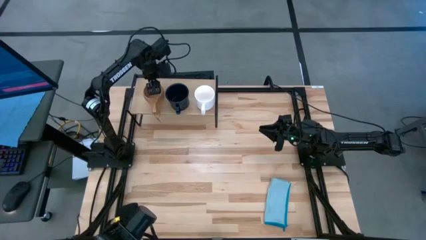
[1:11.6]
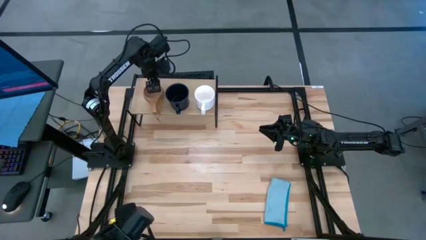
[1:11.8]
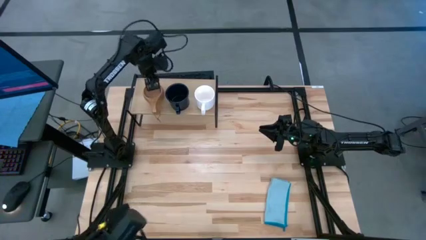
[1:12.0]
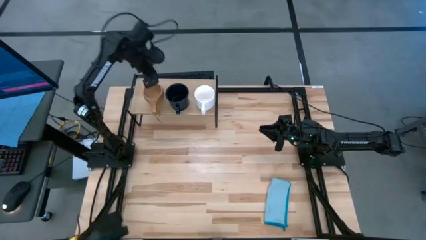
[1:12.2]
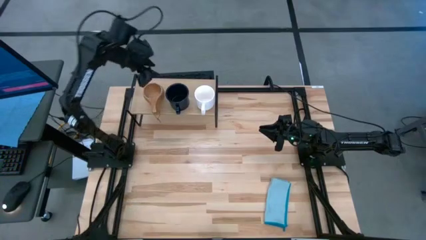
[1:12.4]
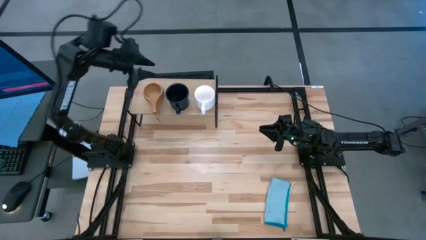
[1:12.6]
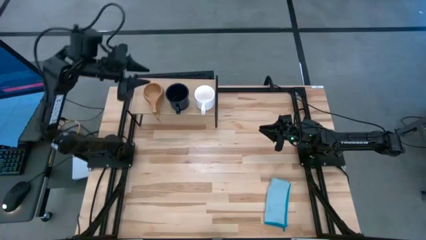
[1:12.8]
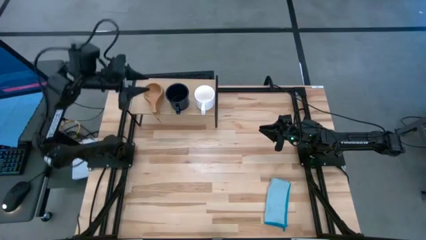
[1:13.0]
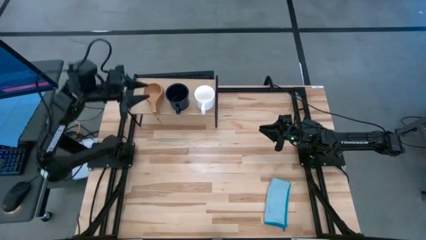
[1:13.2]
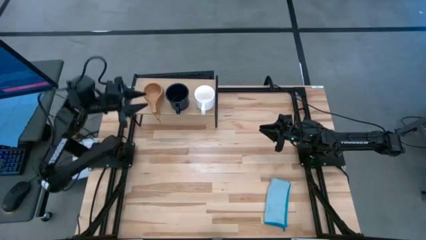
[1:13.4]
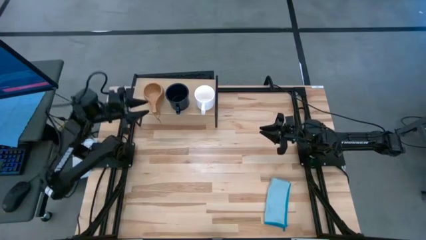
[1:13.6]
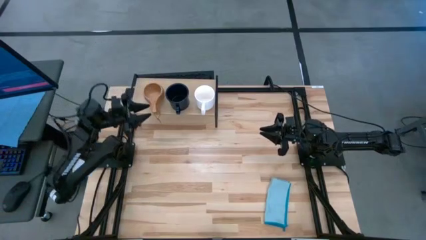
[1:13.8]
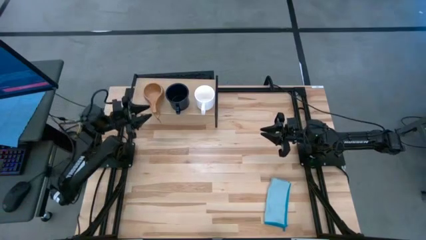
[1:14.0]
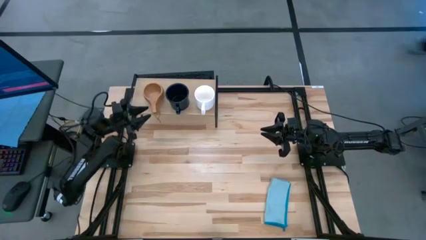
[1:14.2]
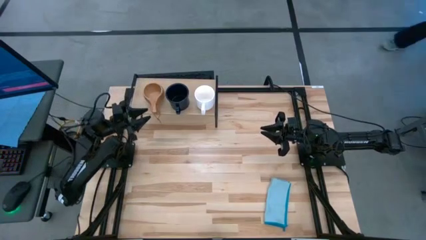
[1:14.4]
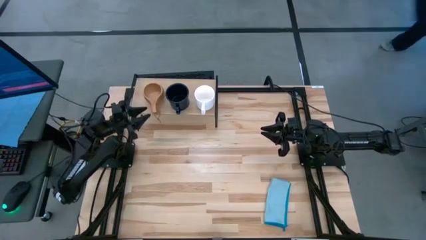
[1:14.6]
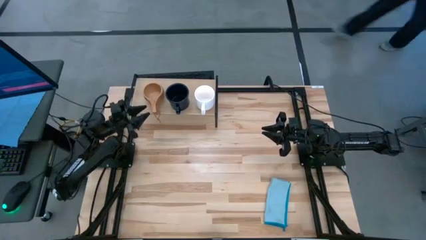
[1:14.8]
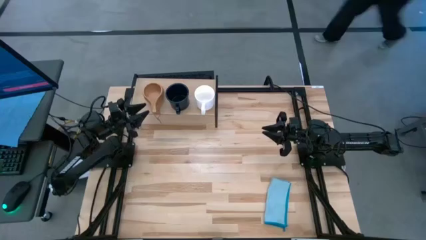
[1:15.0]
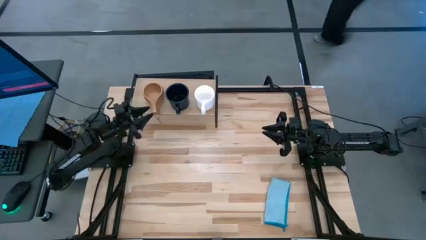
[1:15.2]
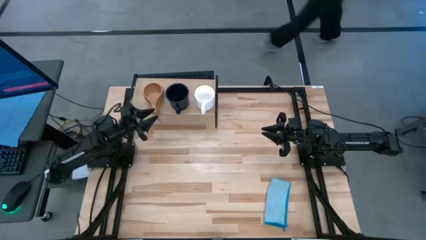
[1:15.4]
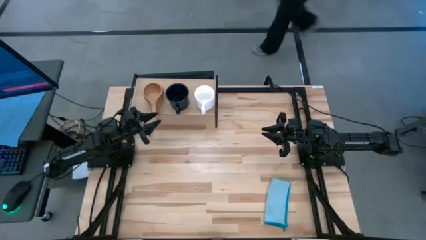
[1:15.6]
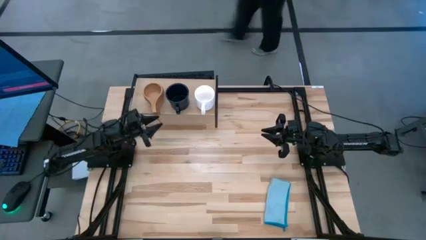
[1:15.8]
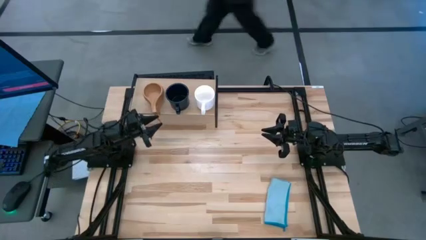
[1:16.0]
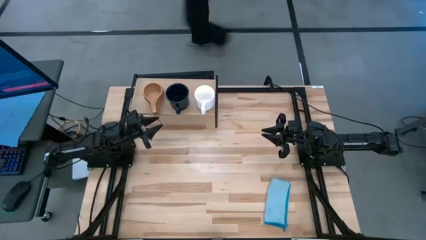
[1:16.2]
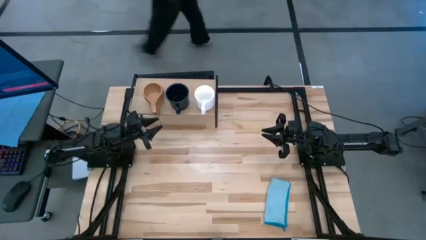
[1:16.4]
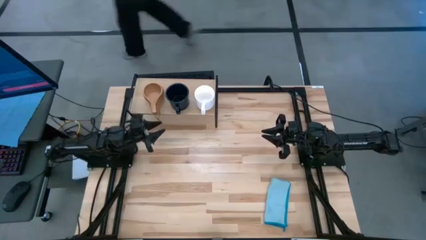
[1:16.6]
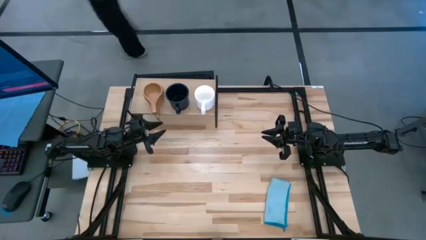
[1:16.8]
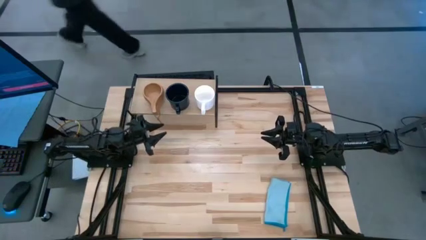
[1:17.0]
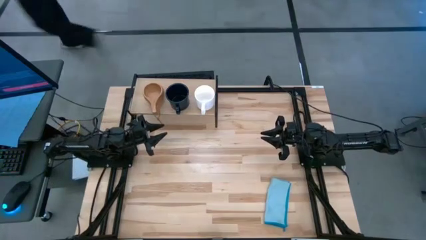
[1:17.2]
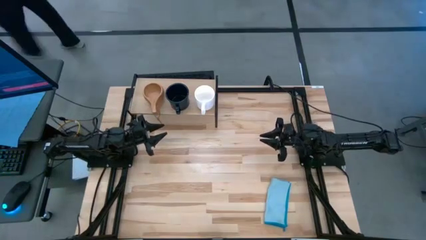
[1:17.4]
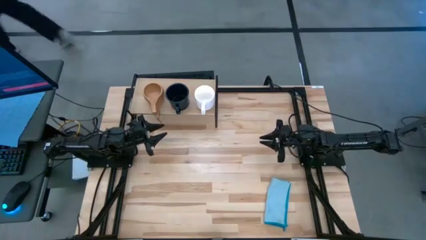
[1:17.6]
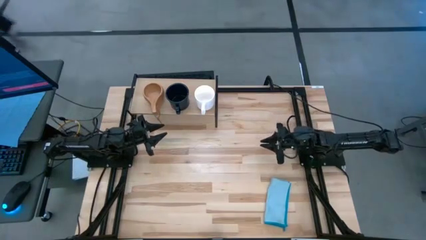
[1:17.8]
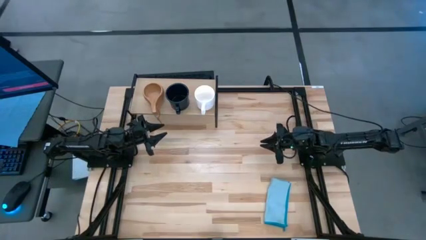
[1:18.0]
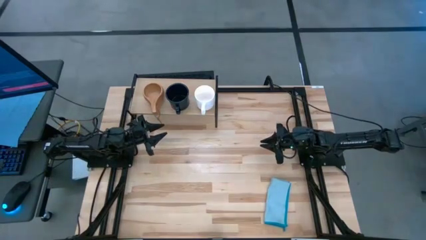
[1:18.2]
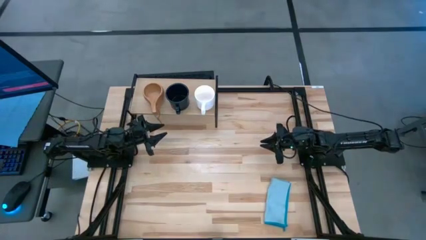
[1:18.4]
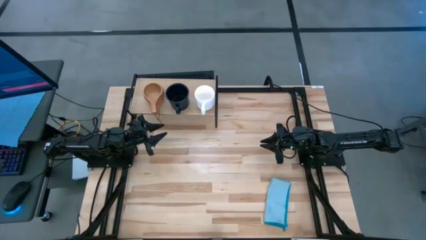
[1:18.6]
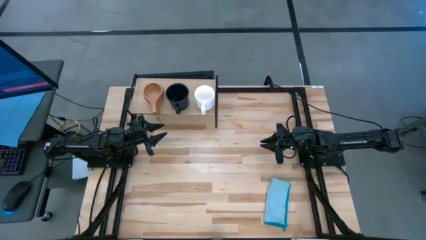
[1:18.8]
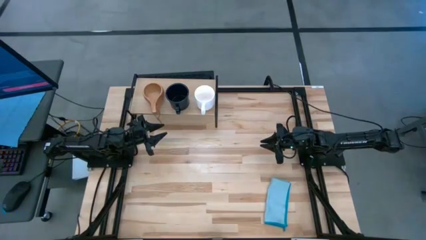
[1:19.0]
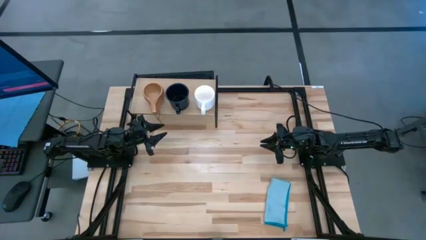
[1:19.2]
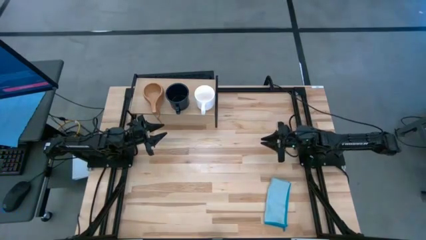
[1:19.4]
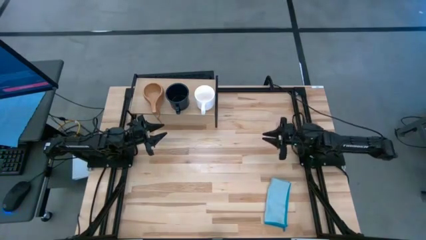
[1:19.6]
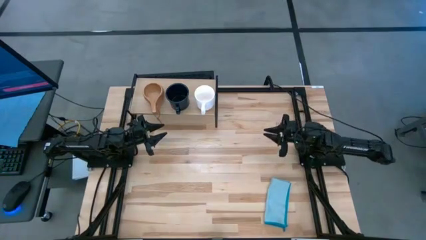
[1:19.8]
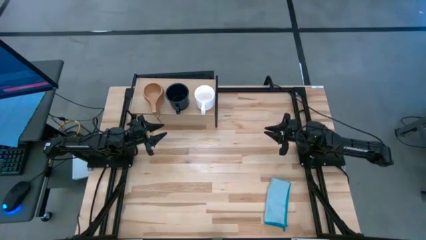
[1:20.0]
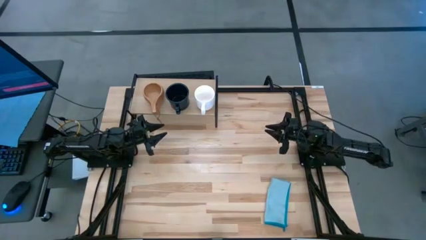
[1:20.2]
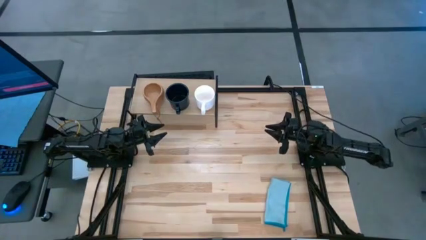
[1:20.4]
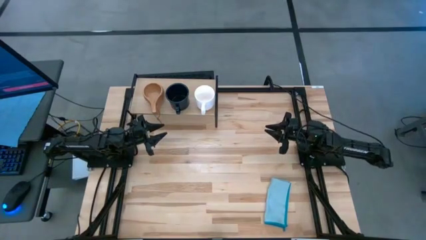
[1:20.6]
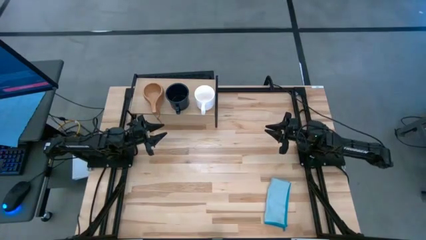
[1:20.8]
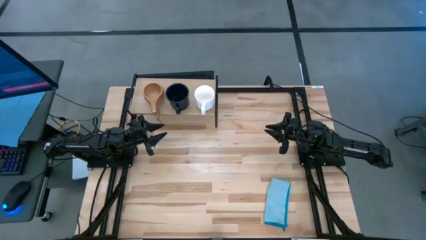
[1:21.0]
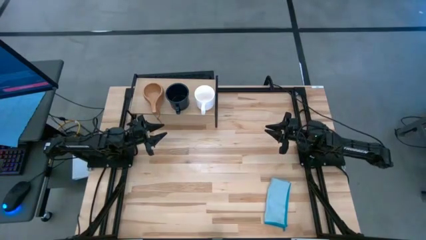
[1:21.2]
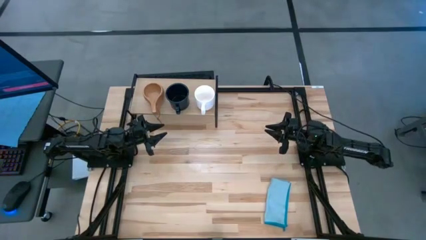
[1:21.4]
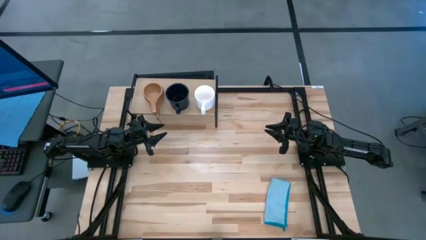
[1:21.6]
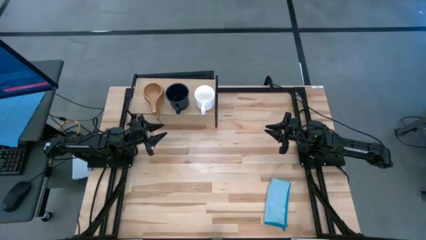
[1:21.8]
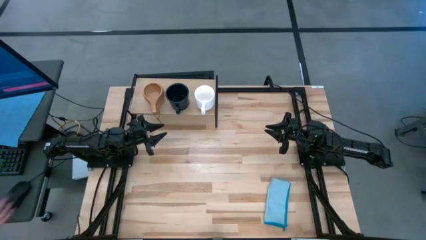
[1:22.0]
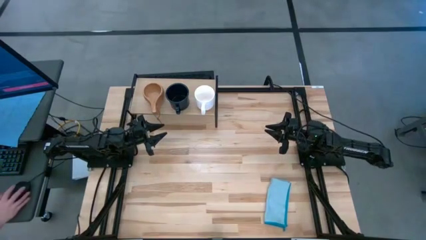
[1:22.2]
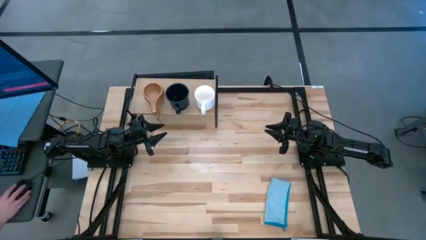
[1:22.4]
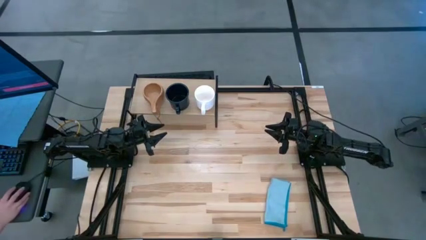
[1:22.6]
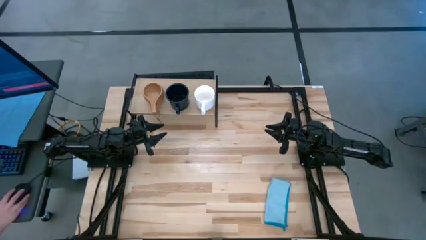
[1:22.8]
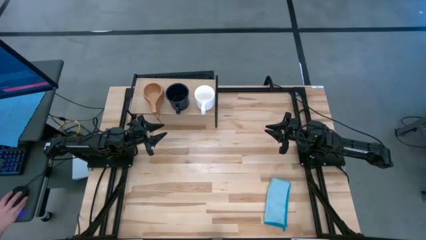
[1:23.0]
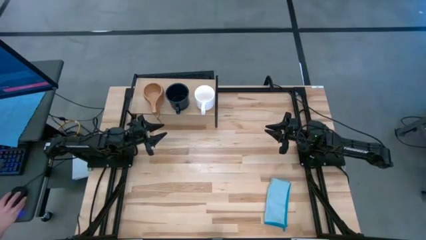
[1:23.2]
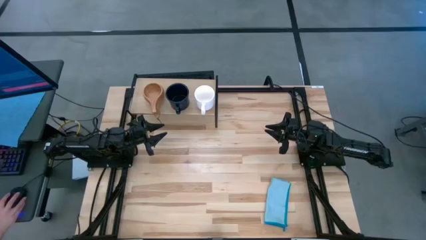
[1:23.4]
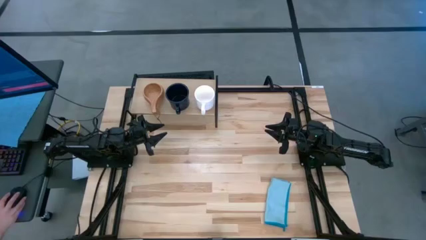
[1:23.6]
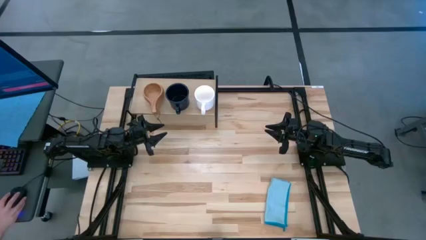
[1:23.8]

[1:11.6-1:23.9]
Task: Stack small to large cups/mugs on shelf
Return to Home Position

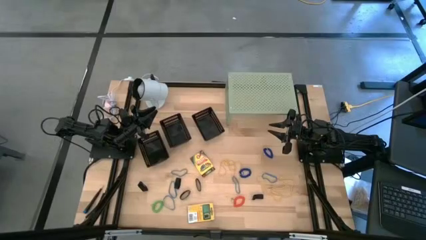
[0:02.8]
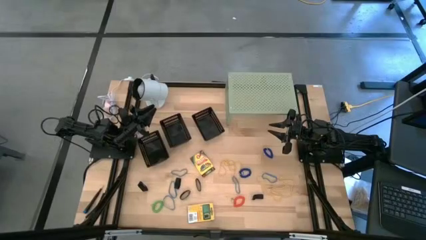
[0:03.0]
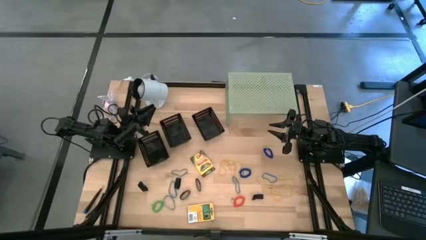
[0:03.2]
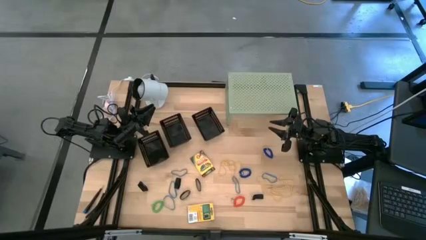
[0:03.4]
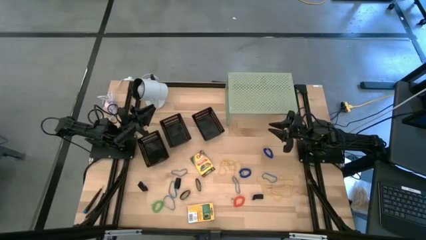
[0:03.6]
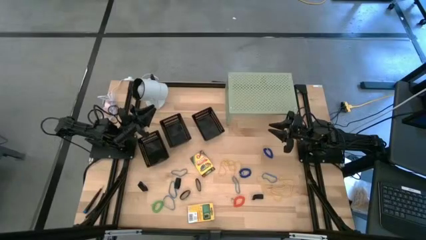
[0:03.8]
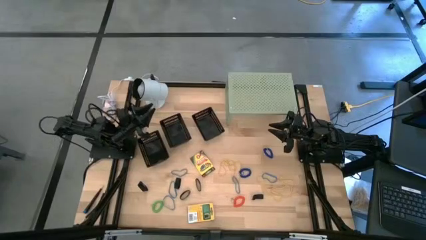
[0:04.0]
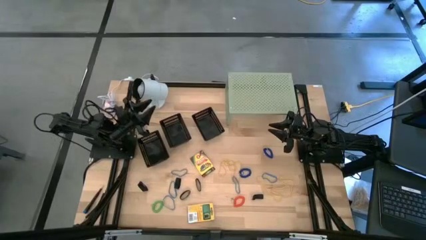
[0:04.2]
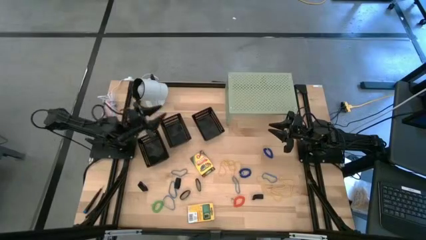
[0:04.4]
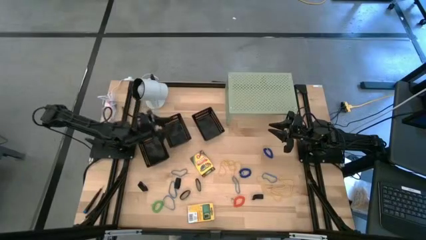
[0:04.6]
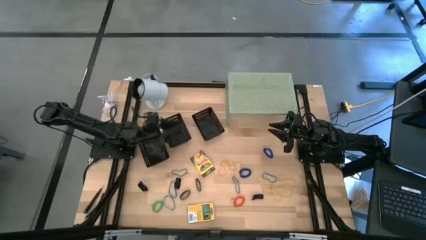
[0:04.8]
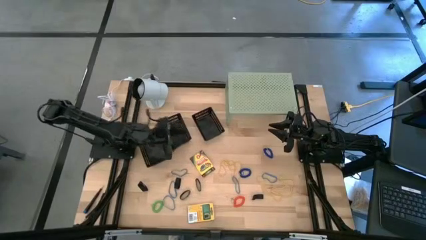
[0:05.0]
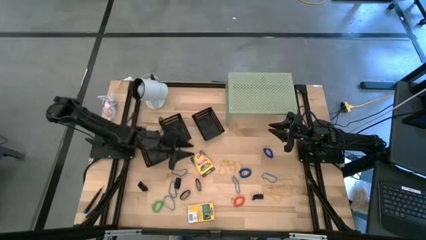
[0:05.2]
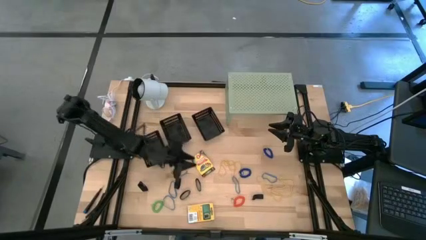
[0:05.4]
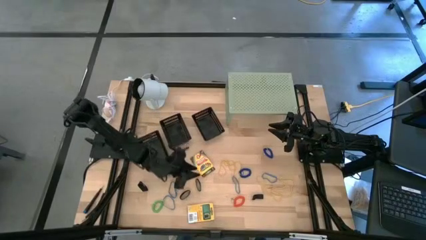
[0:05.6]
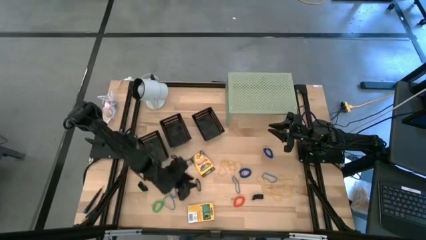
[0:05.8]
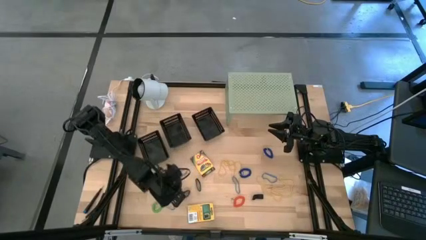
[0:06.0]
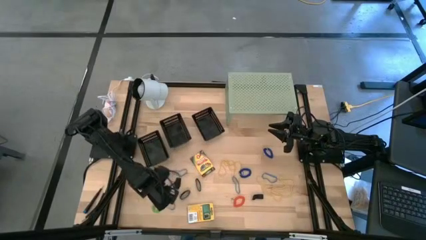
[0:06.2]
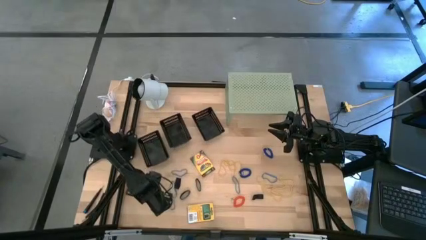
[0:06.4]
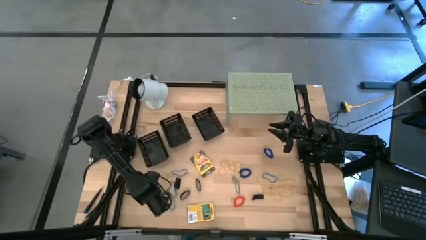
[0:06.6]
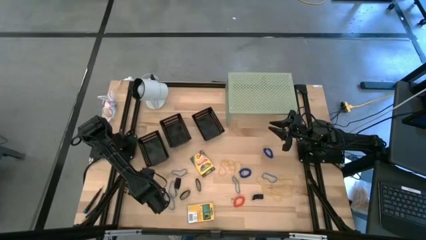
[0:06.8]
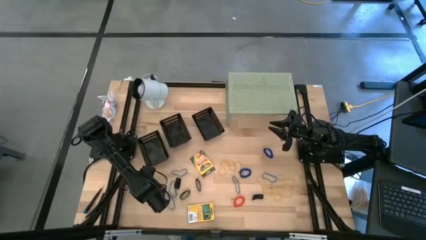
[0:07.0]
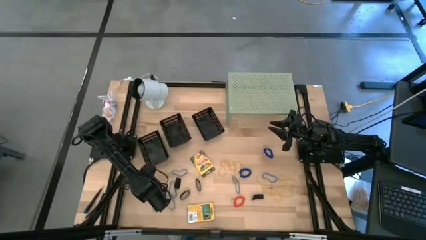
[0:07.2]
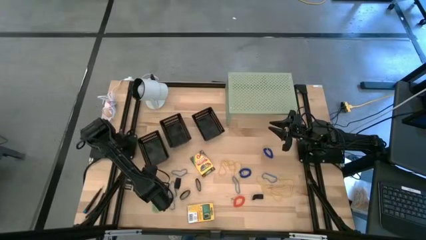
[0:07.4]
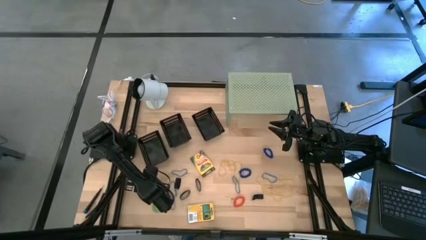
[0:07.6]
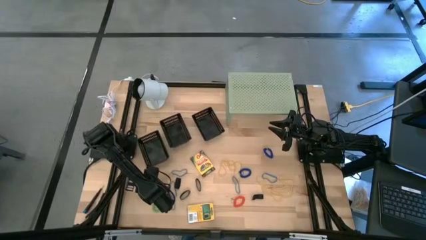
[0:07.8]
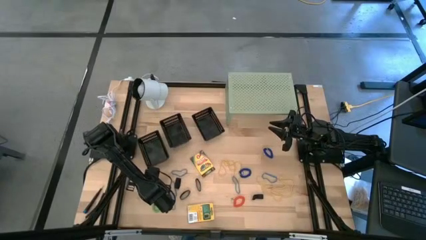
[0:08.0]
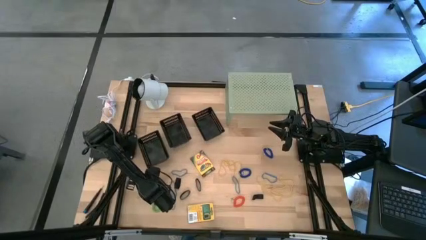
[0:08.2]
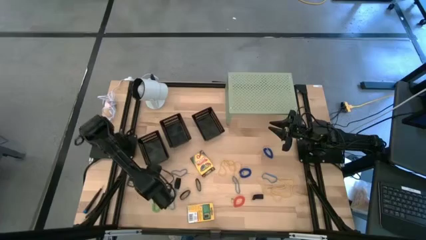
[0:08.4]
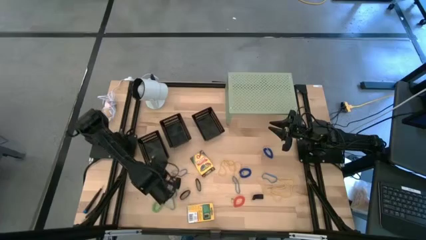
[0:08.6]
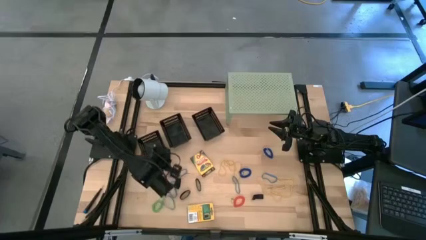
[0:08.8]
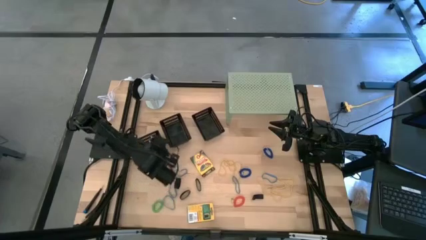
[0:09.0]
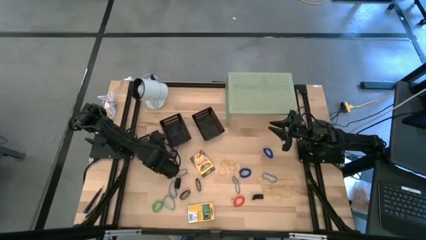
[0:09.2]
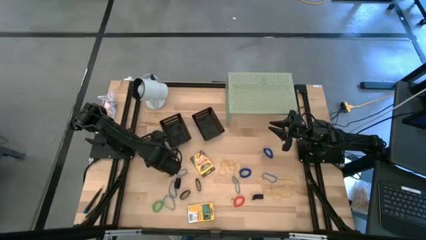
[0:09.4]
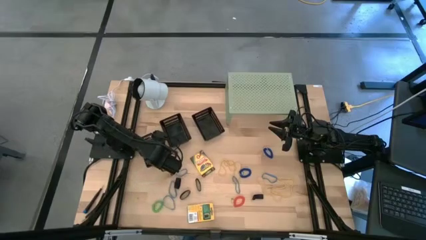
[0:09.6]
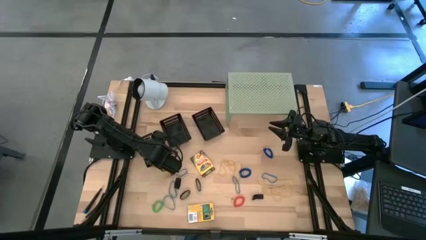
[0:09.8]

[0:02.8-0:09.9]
Task: Pick & Place Office Desk Supplies
Put the black rubber band into the left black basket
